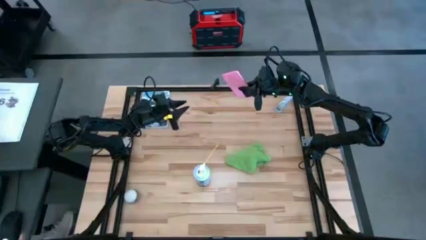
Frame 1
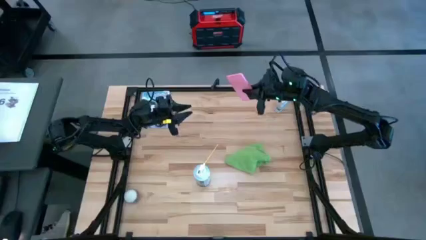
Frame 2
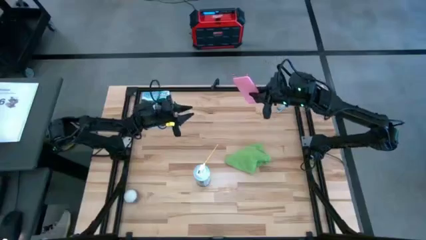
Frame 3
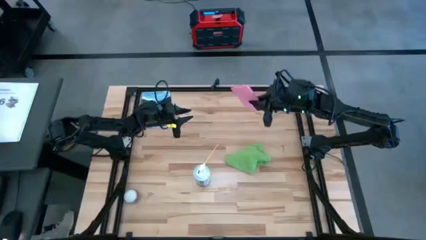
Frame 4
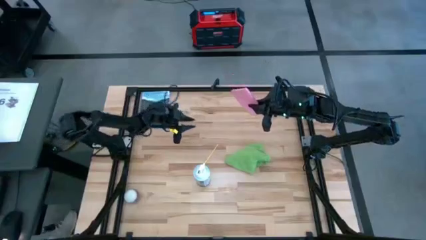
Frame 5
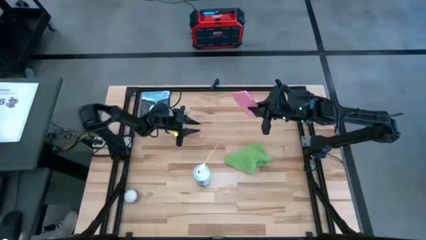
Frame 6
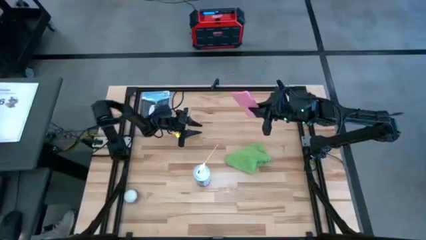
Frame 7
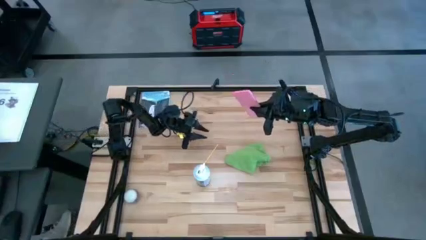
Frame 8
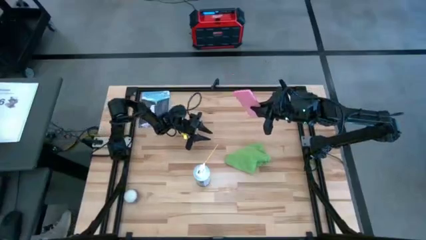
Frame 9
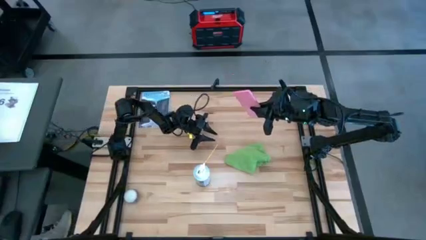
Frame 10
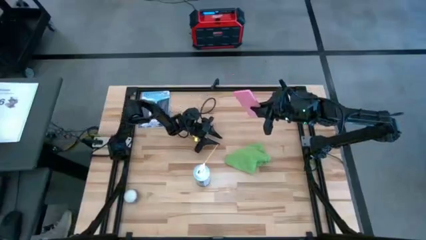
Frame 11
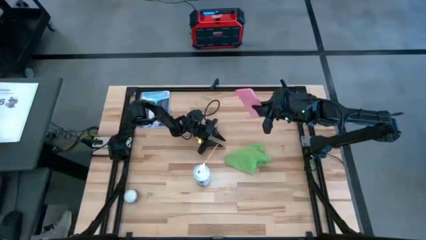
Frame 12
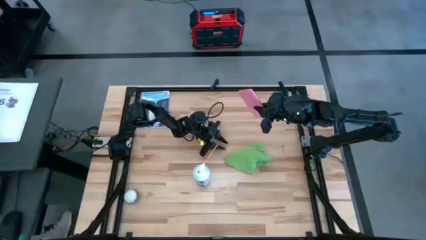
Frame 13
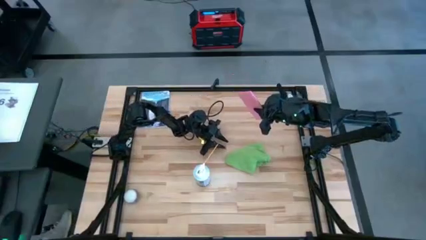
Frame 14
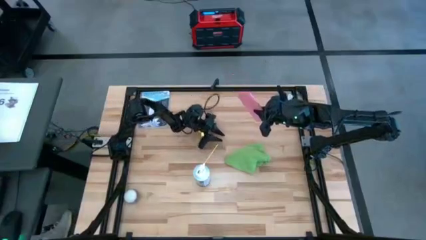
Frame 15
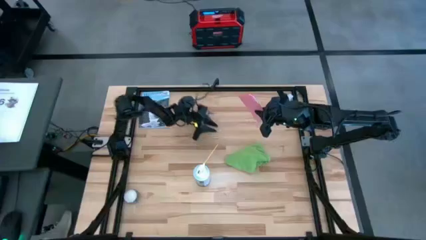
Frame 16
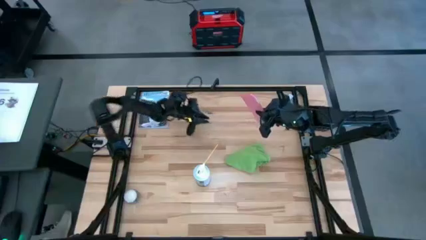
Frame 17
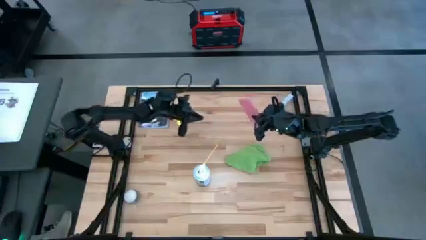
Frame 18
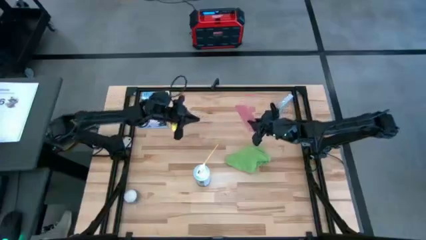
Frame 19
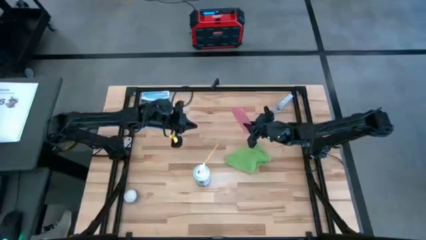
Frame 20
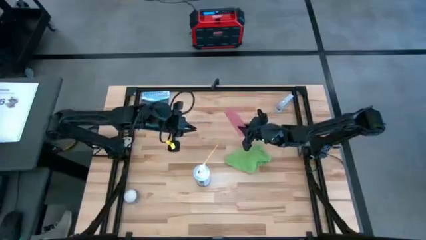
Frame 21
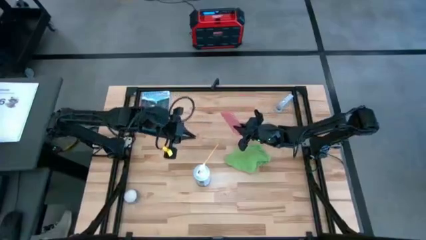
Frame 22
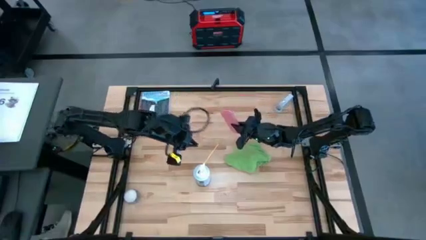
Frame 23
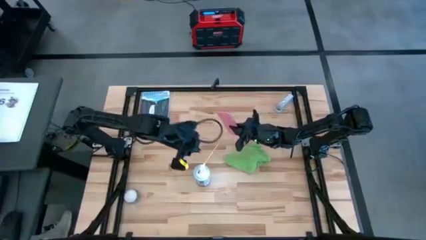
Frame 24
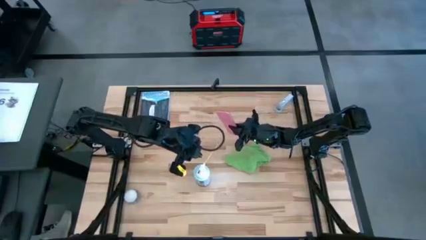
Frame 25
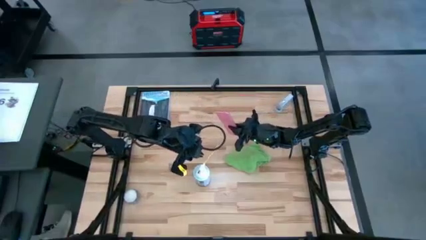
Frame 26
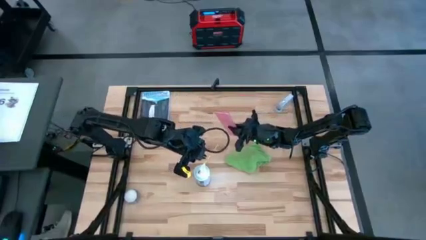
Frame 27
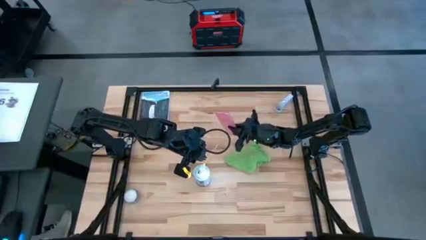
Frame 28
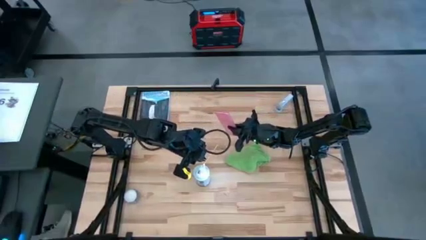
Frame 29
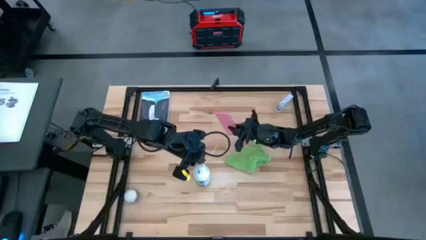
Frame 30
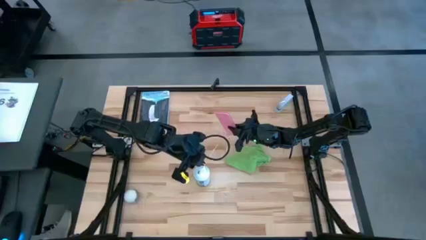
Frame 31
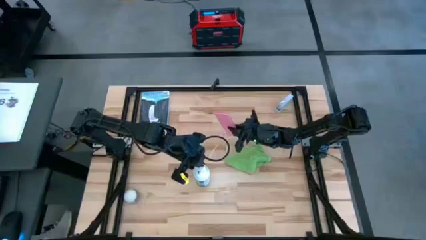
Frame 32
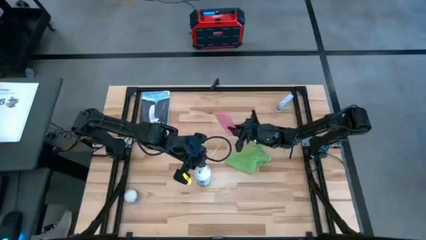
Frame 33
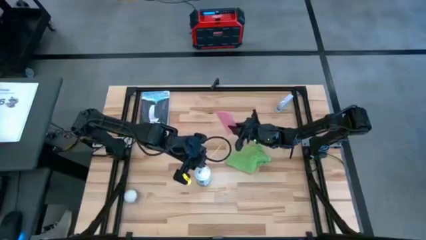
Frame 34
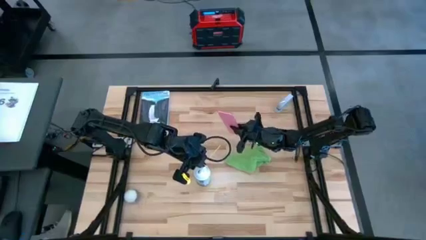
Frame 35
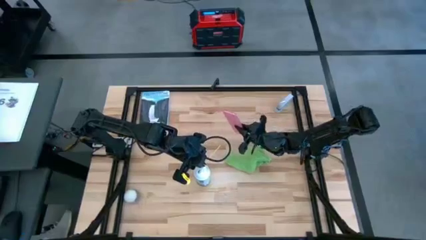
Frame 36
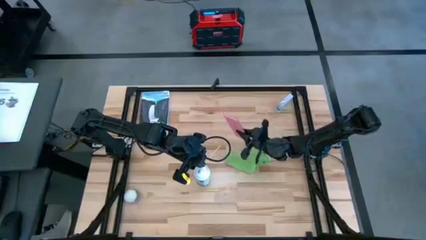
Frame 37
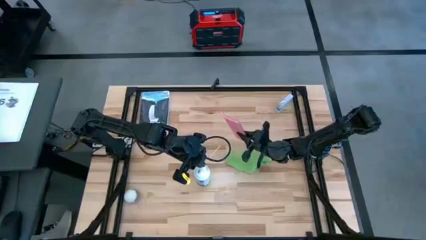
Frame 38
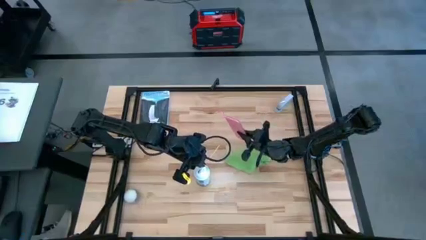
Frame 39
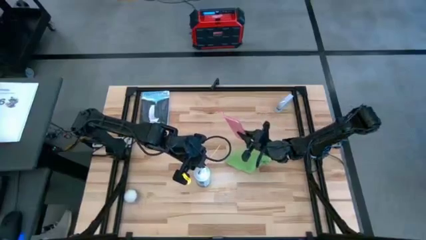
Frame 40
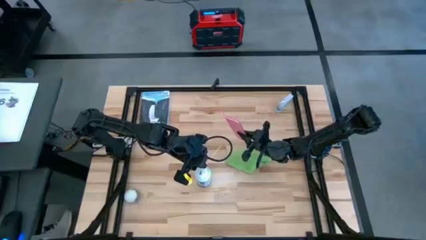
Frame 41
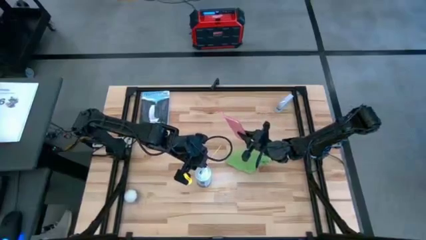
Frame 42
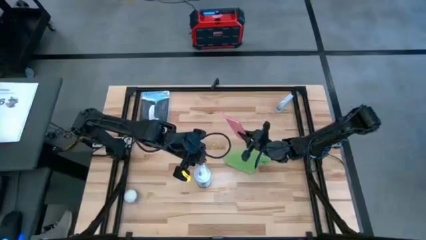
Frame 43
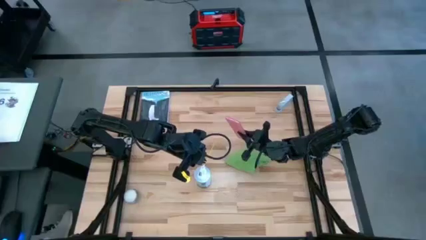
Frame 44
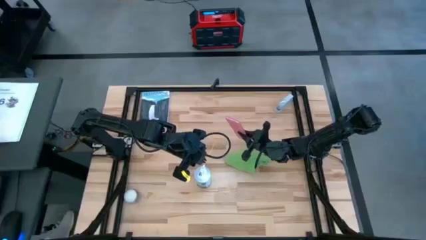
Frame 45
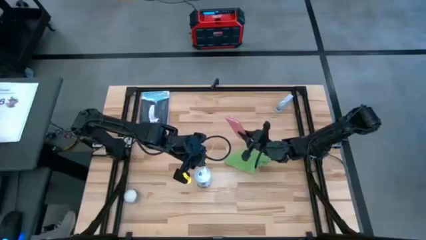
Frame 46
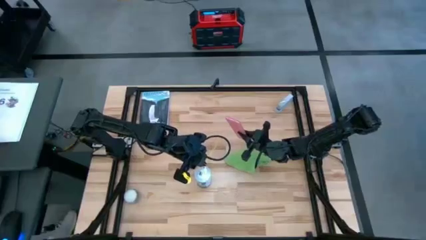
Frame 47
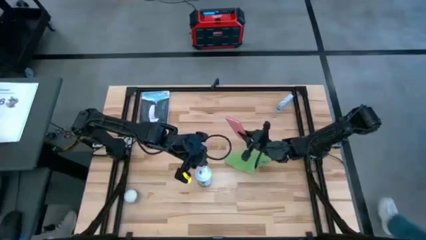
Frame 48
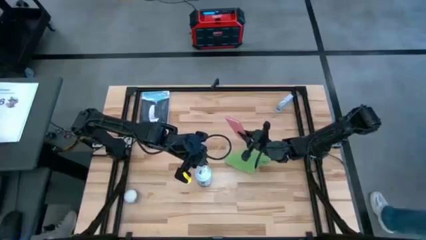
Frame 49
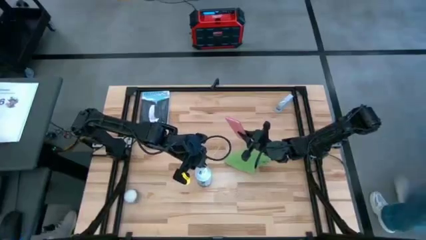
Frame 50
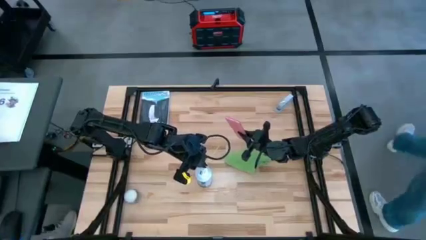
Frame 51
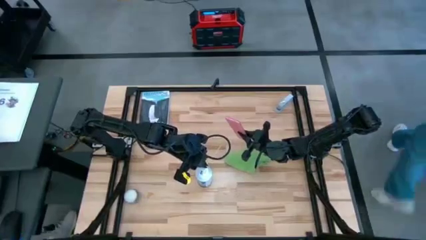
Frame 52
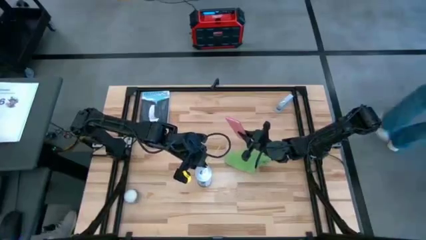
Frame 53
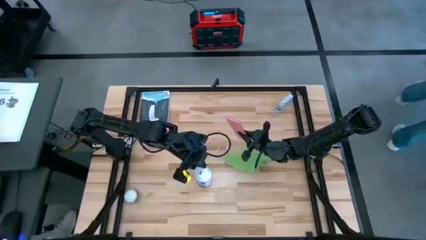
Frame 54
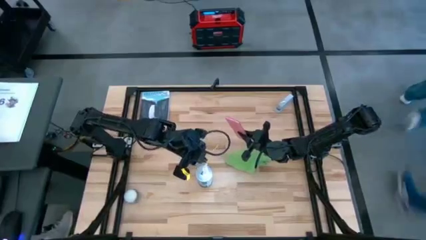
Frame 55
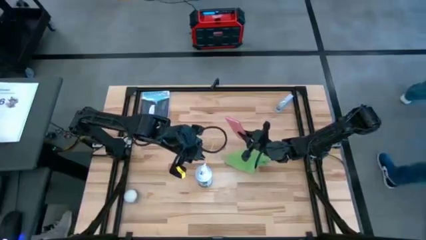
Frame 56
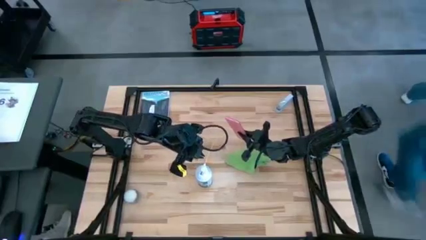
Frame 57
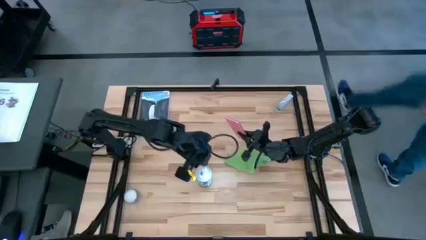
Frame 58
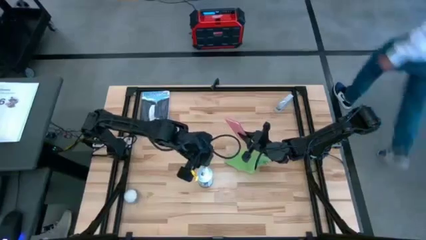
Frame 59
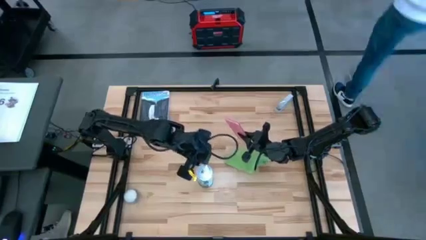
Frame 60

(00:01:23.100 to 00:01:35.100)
Task: Apply microfiber cloth
Spray the back of the black cellphone with the white spray bottle

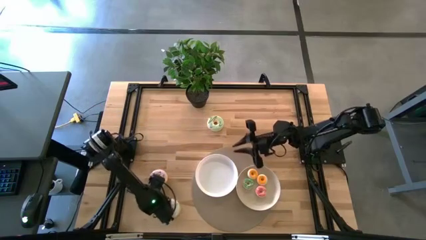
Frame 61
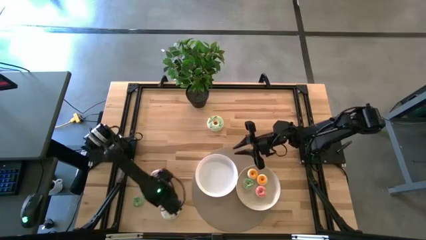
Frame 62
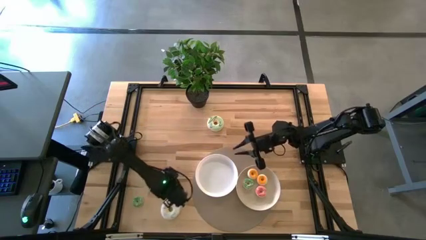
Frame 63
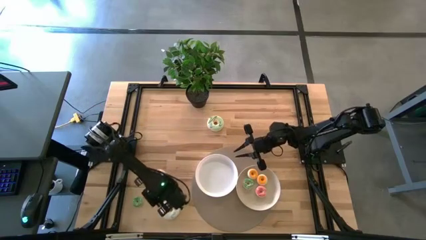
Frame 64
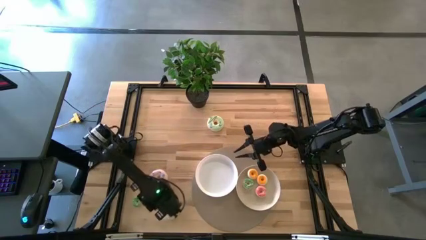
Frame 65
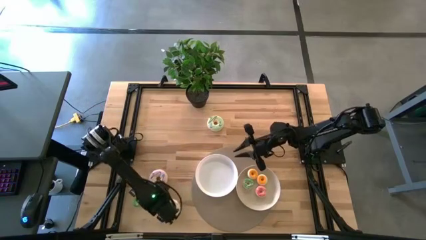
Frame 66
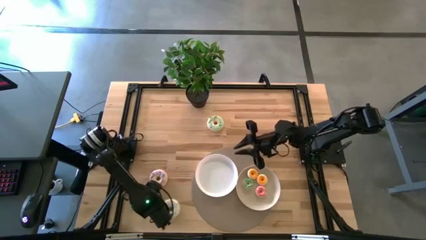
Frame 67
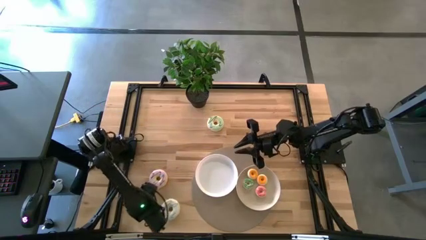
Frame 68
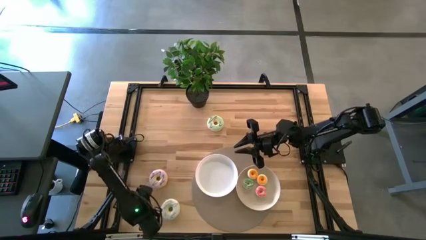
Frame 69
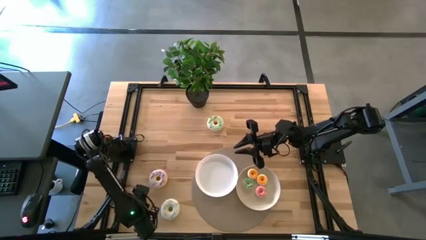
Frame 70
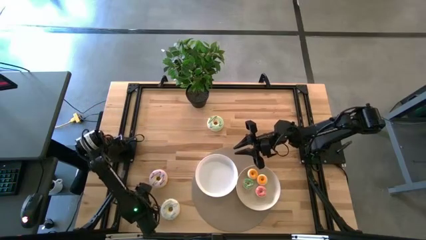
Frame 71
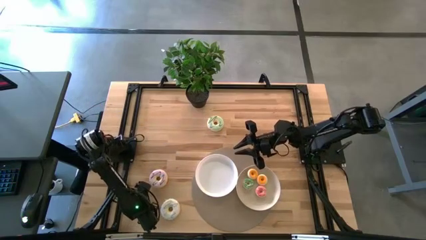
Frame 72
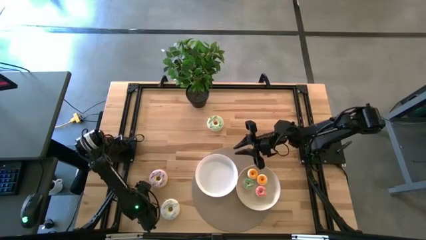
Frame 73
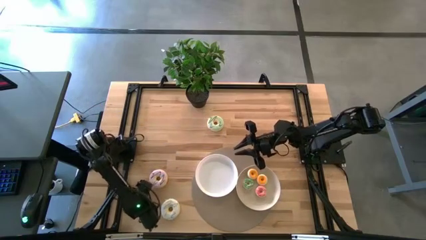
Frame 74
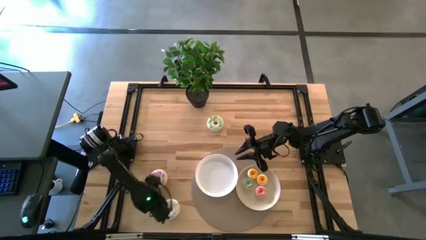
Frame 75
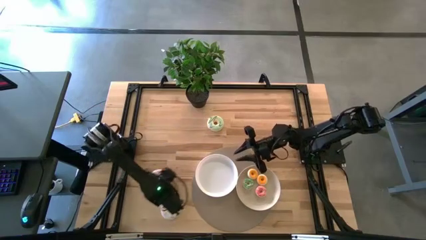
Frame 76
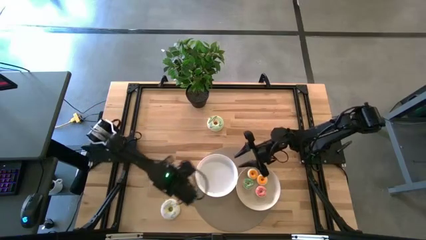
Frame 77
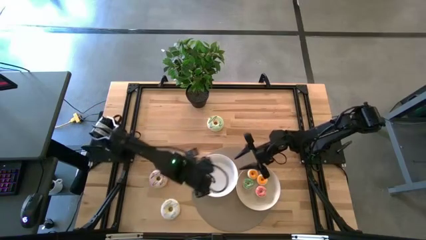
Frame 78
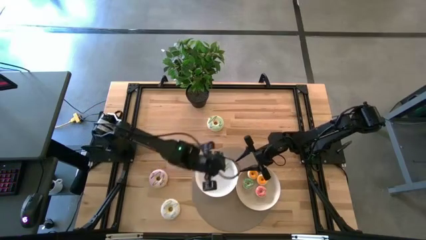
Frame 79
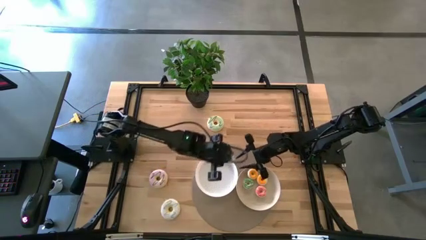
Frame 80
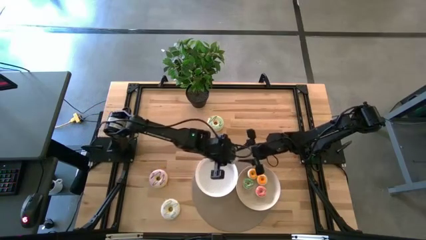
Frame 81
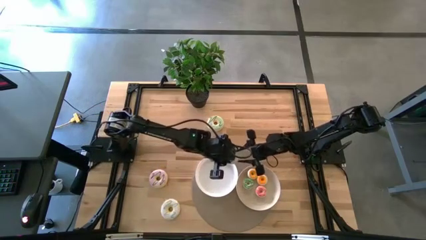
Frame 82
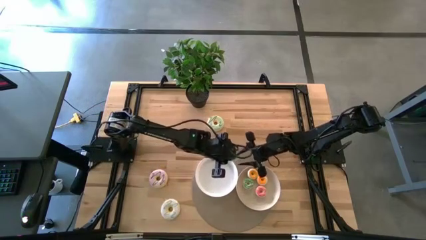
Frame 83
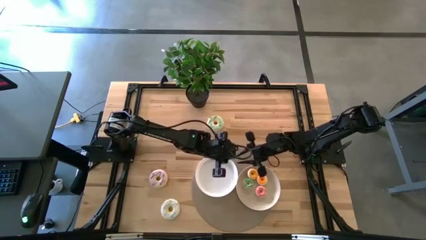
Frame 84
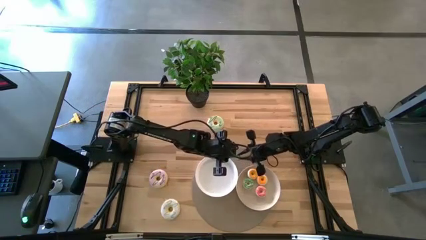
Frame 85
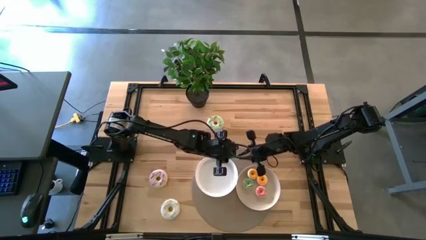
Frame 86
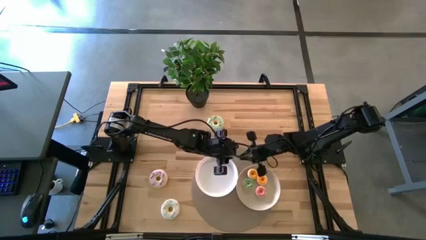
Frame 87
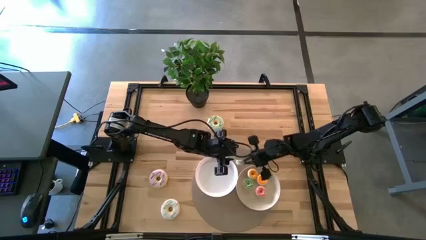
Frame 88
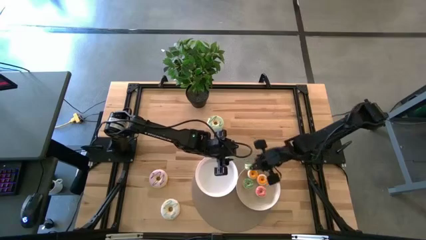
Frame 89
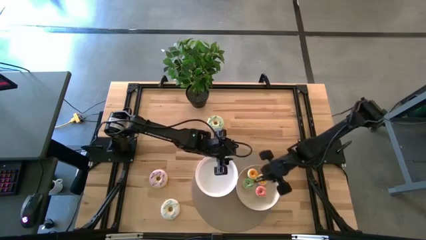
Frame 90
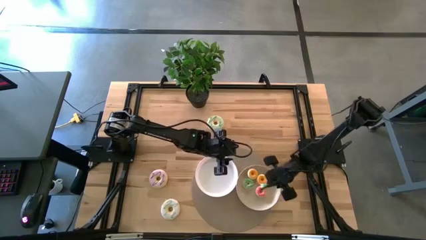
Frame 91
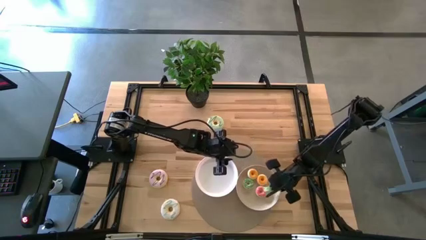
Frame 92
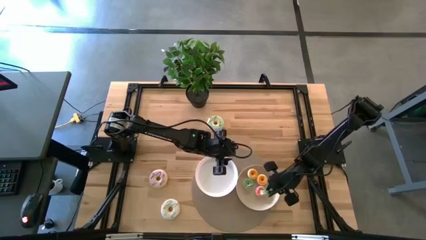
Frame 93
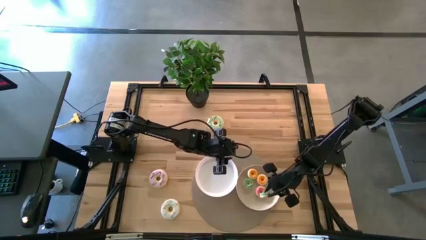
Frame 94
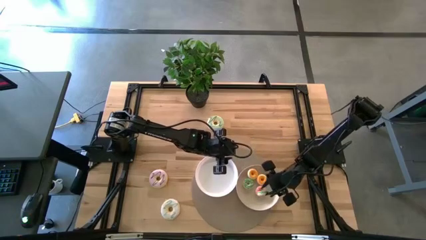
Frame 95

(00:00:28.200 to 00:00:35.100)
Task: Pick & Place donuts
Put the small green doughnut on the gray plate
